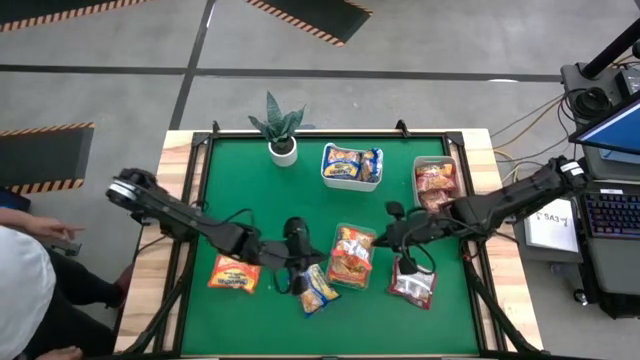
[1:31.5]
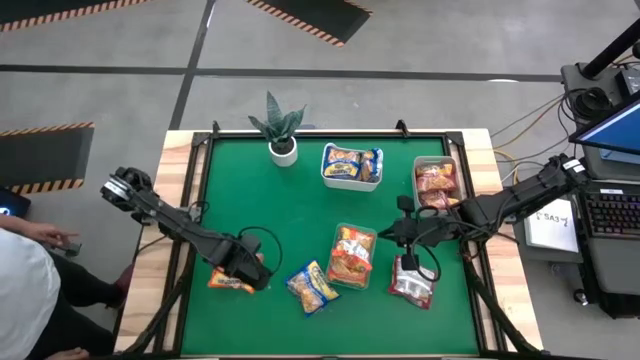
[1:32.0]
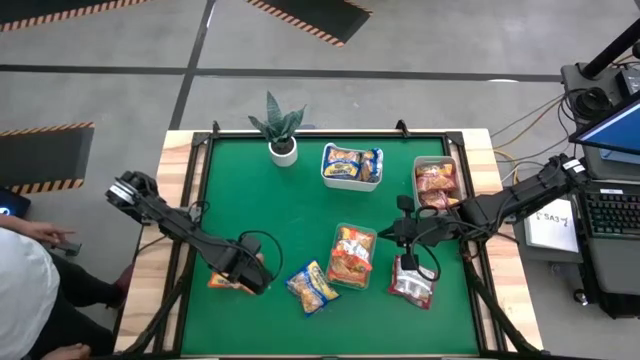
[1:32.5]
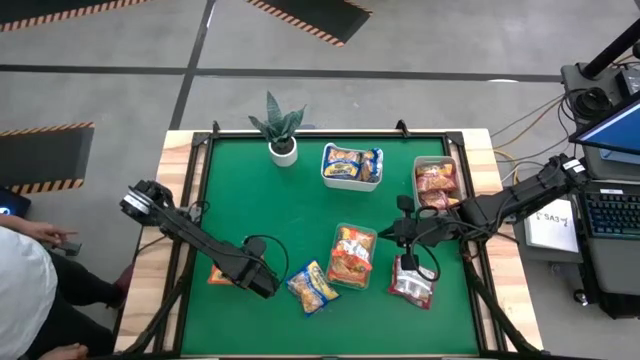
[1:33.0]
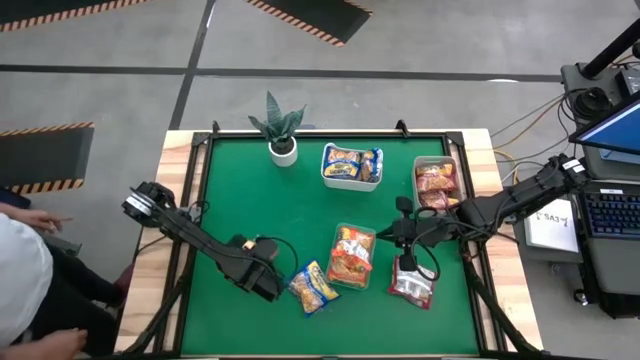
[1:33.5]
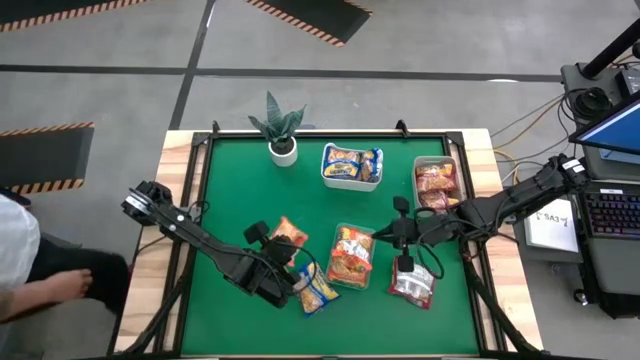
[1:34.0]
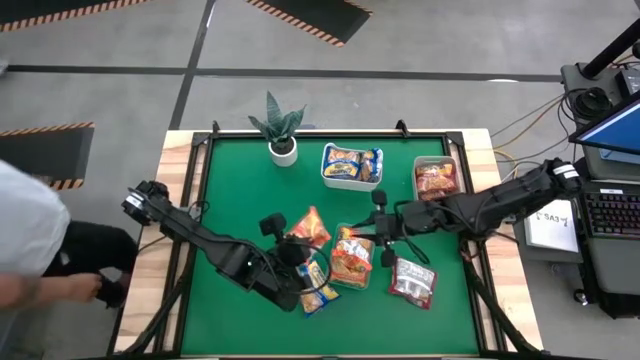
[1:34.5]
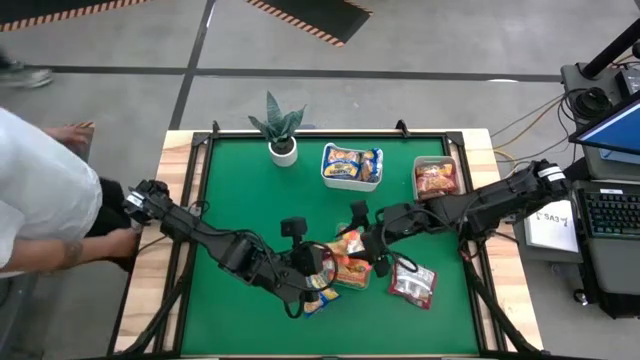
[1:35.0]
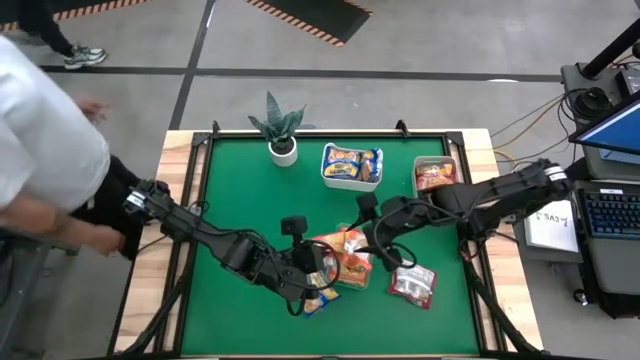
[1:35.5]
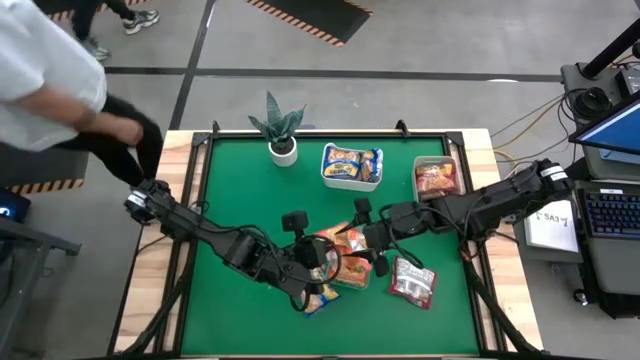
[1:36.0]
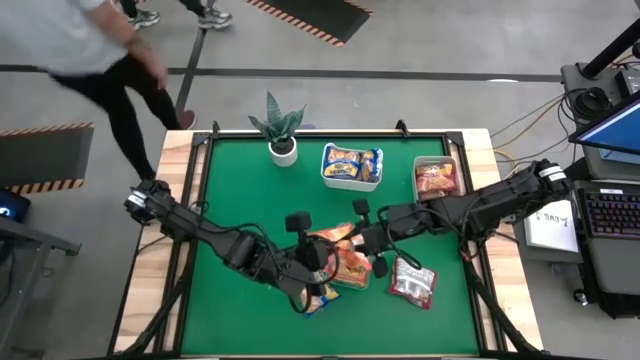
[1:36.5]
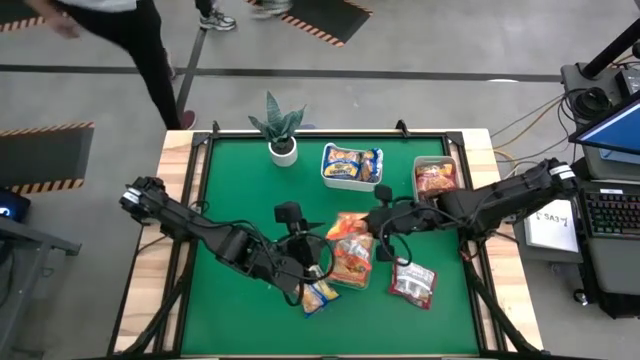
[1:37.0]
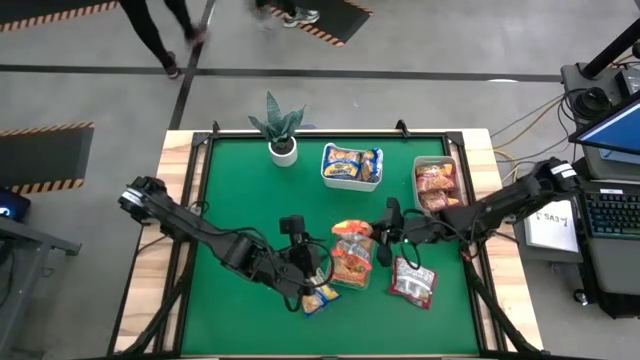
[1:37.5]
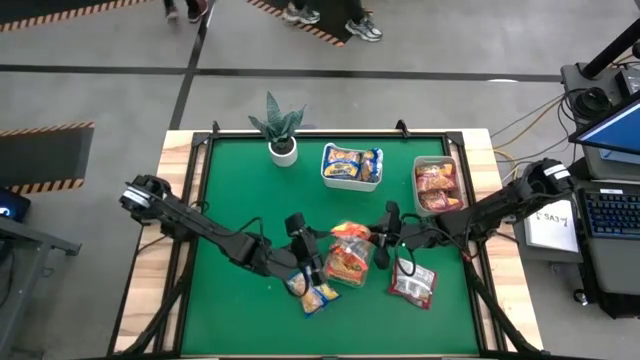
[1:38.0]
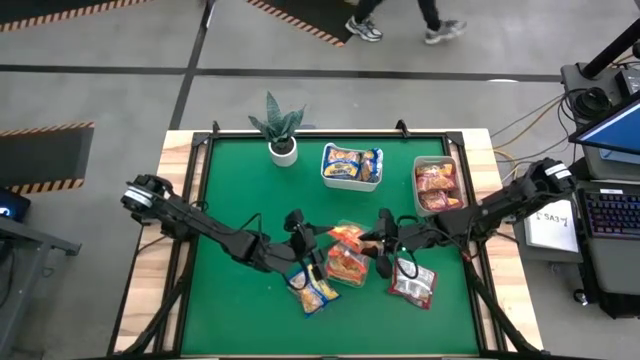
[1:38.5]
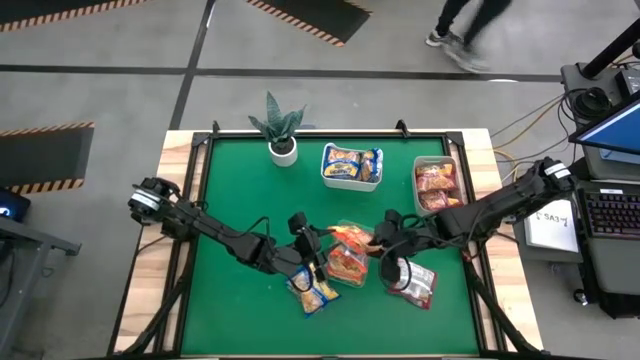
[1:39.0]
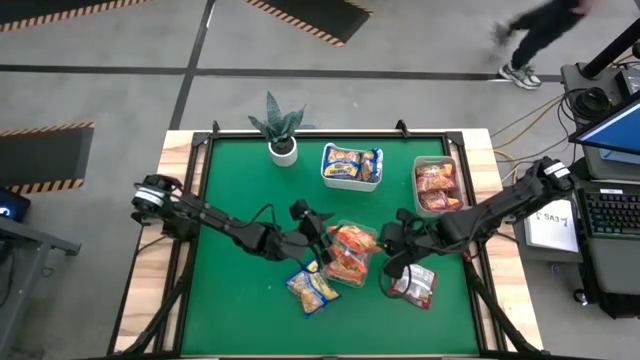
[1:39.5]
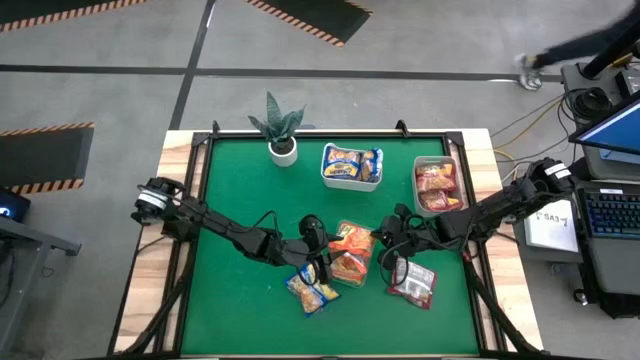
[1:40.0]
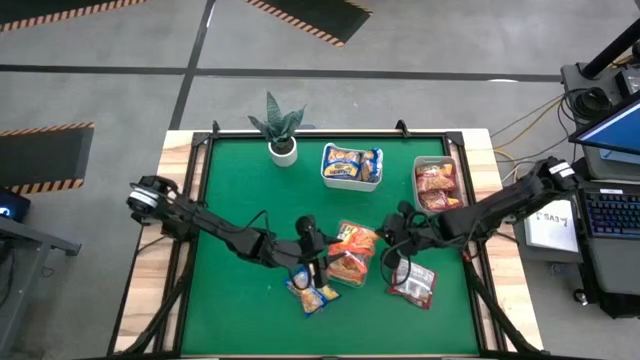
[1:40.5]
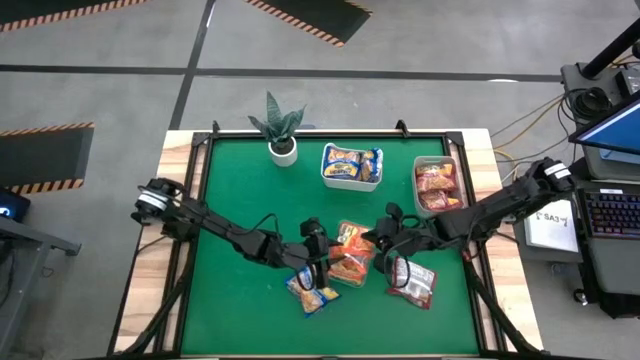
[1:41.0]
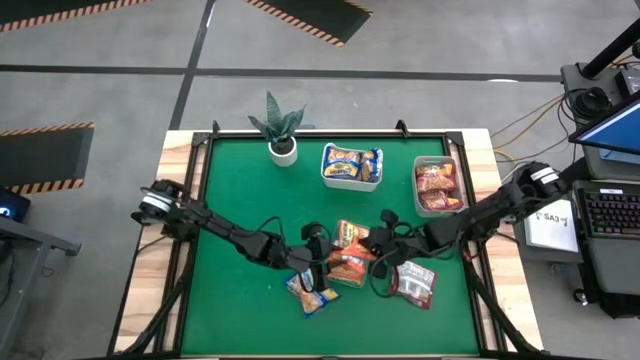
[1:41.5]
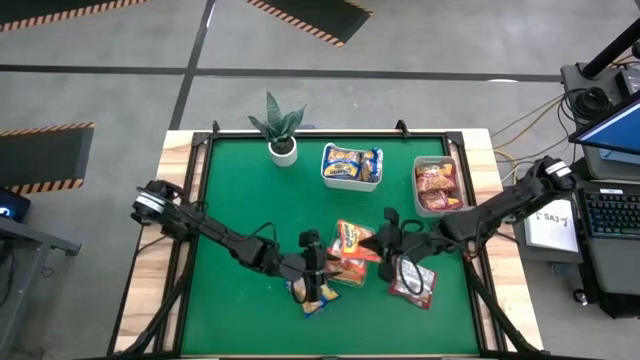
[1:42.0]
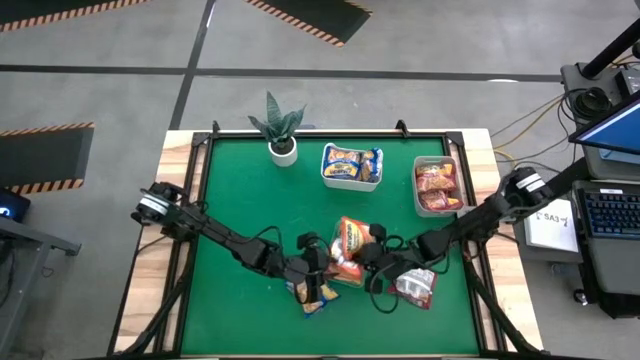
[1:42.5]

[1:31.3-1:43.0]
Task: Sort Maruchan noodles
Put the orange noodle pack into the green bin

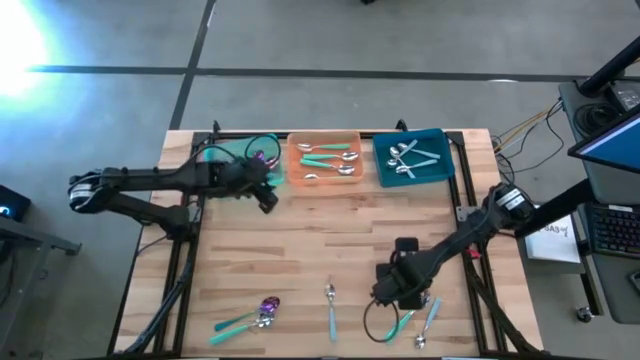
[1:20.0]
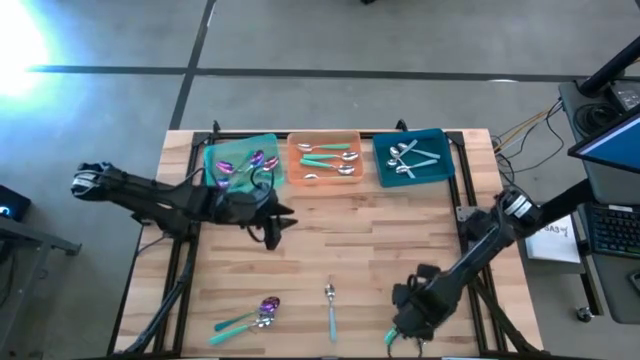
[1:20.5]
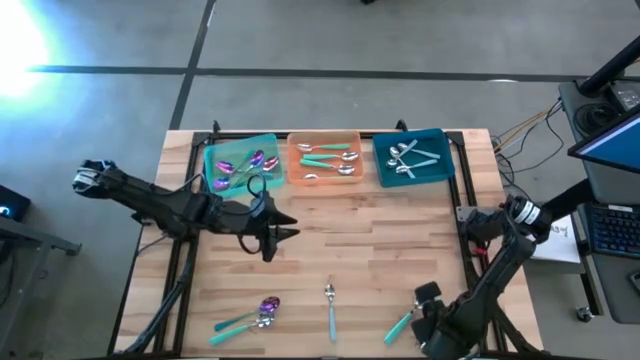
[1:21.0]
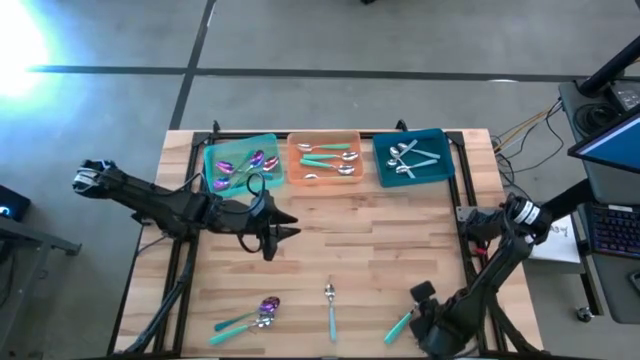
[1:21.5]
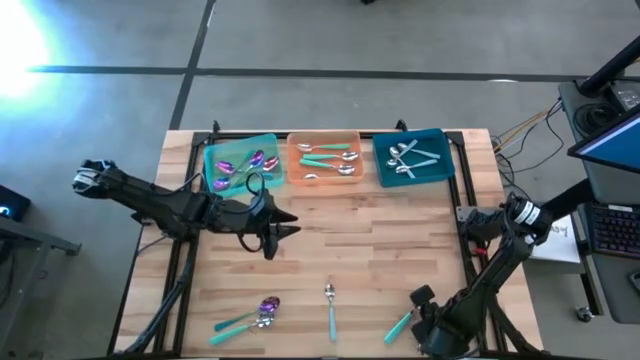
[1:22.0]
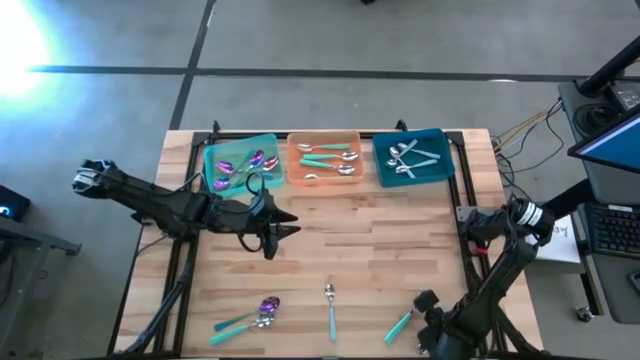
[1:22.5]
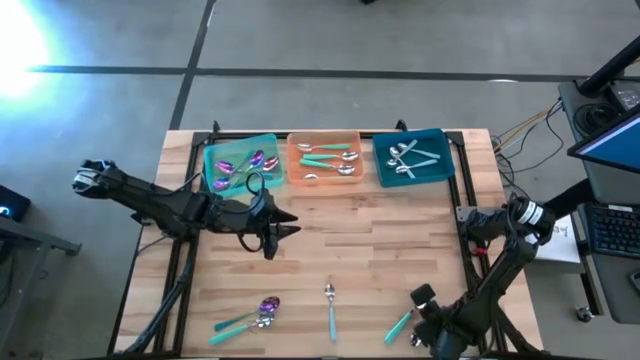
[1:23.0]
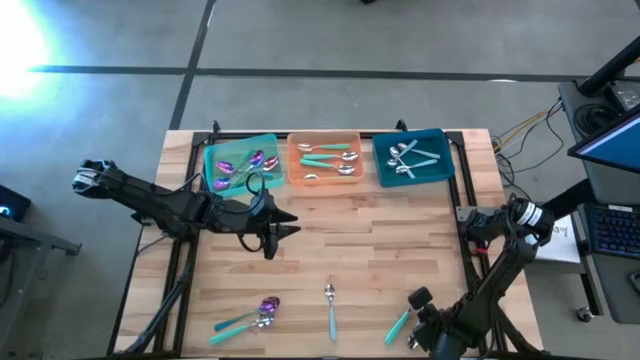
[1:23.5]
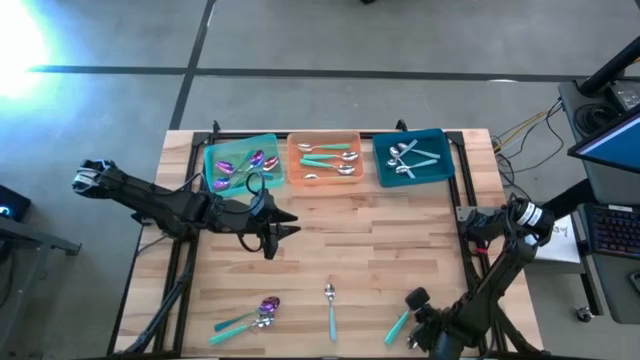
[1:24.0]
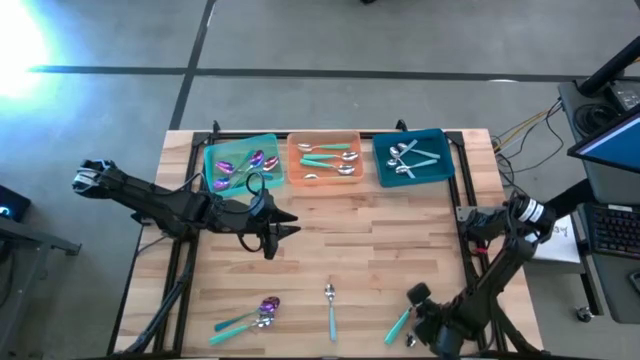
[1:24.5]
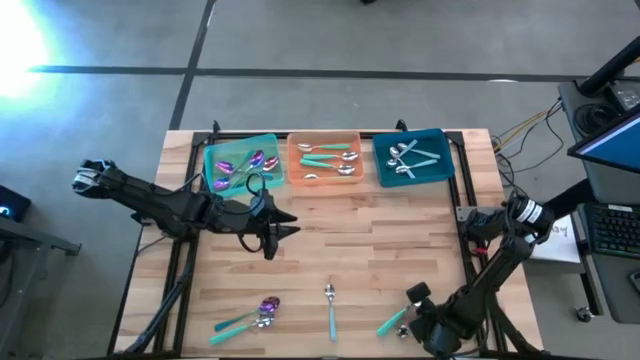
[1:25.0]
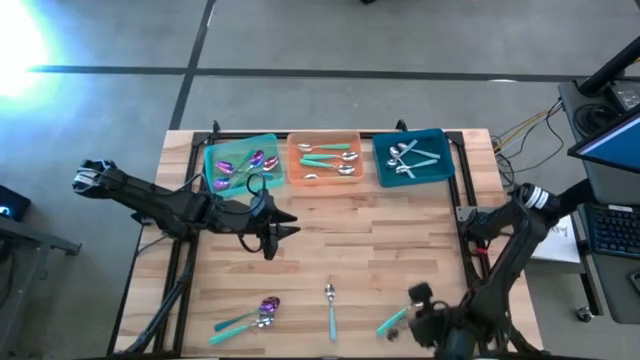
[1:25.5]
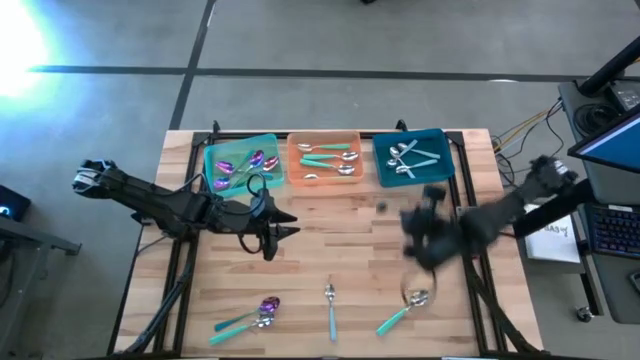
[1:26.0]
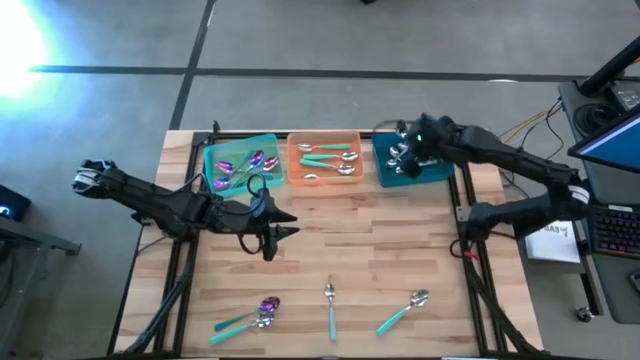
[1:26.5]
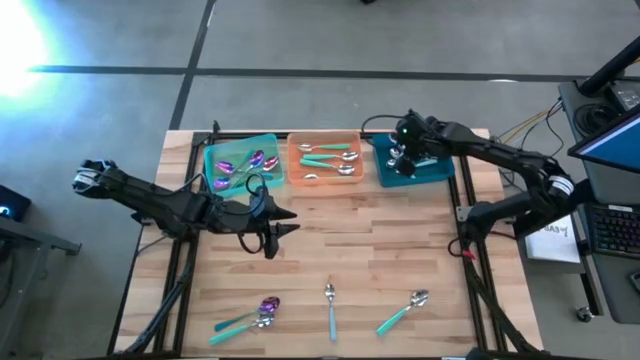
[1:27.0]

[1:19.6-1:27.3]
Task: Sort silverware by color (type)
Put the light blue spoon into the blue bin
